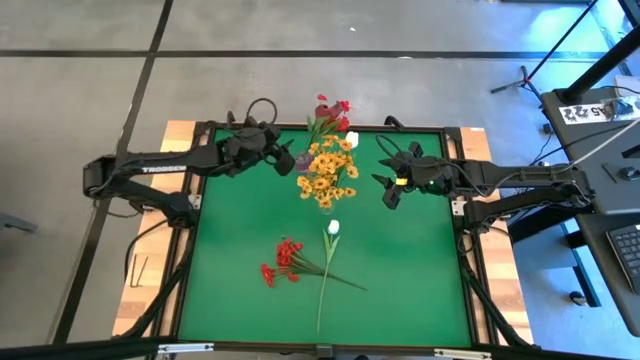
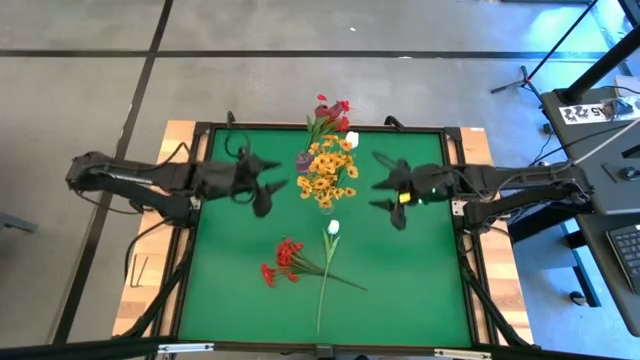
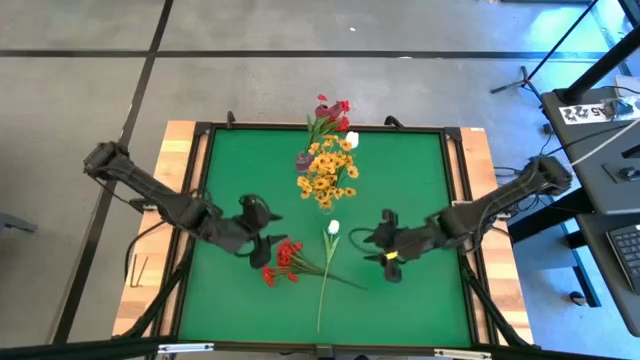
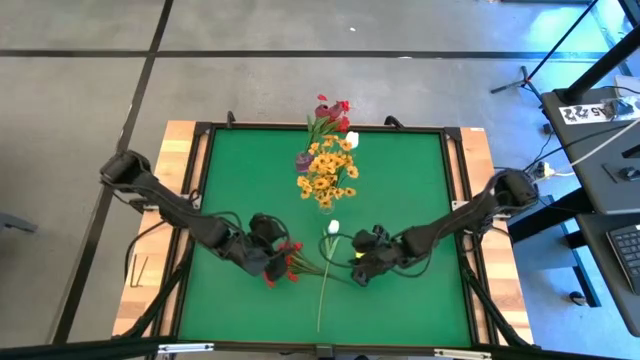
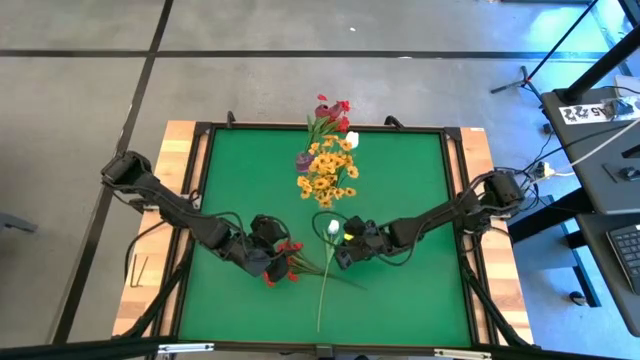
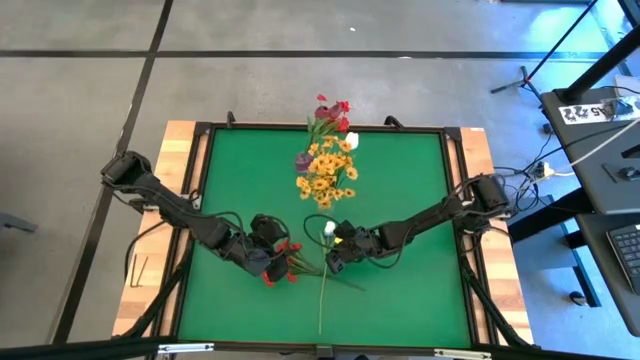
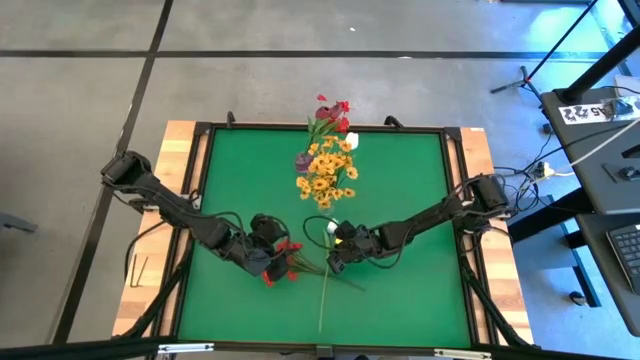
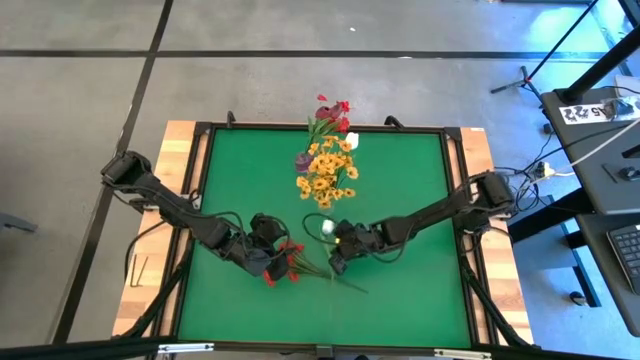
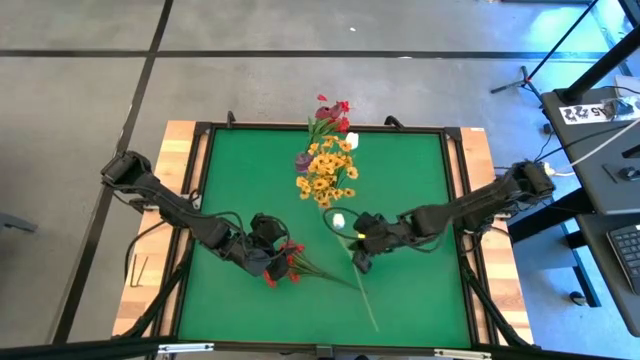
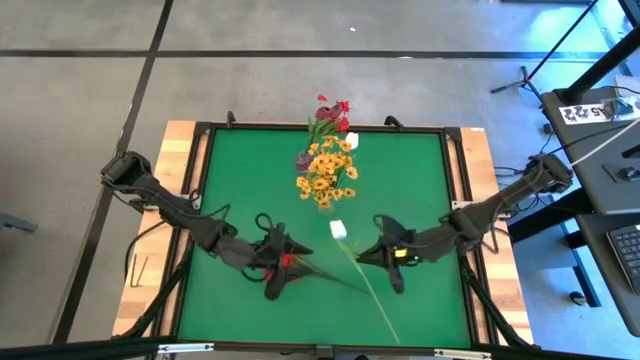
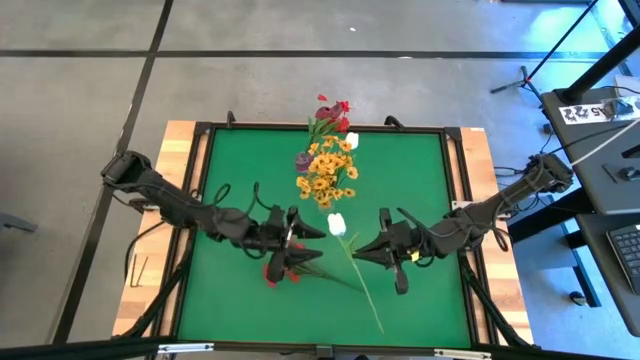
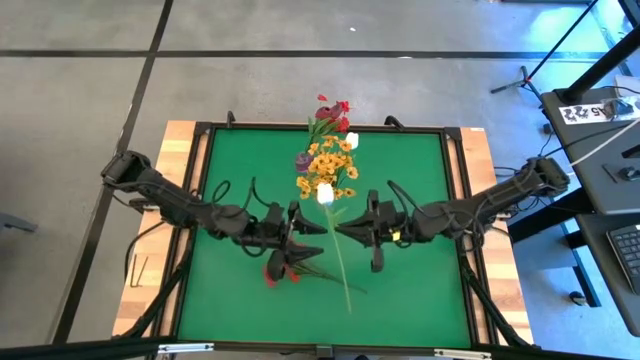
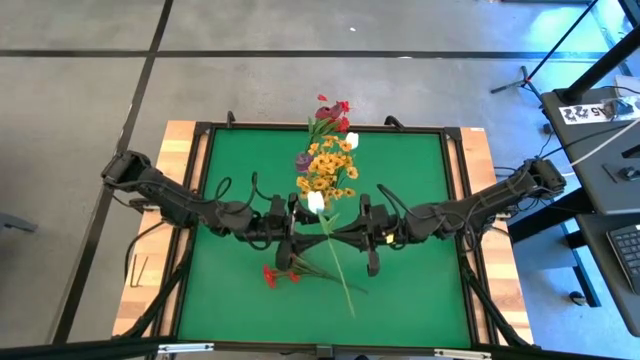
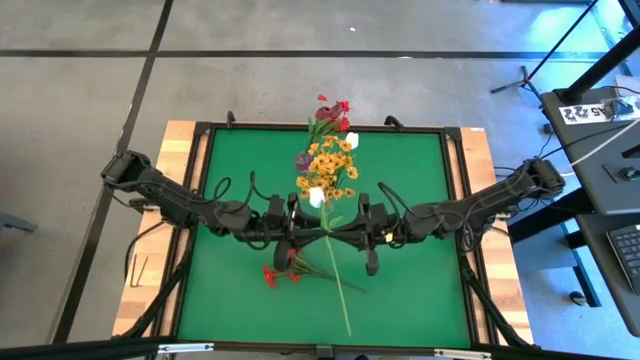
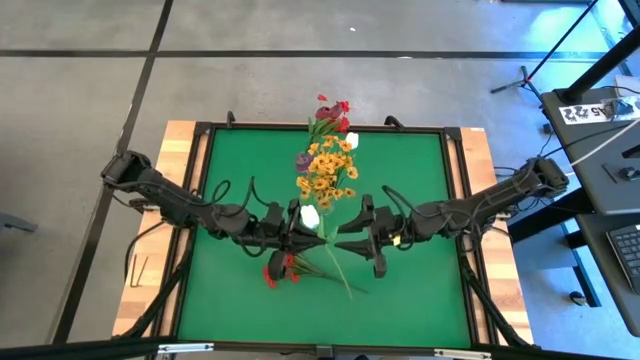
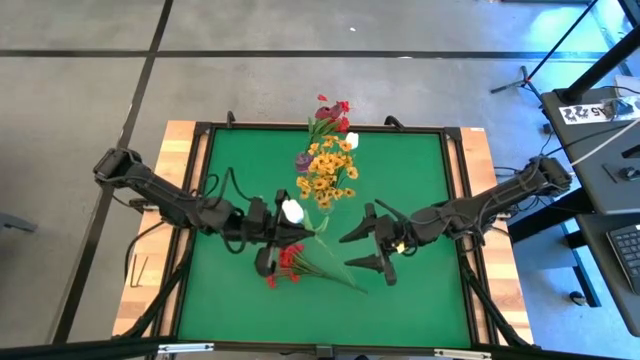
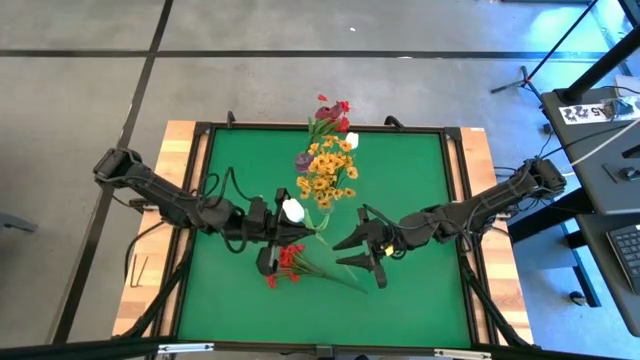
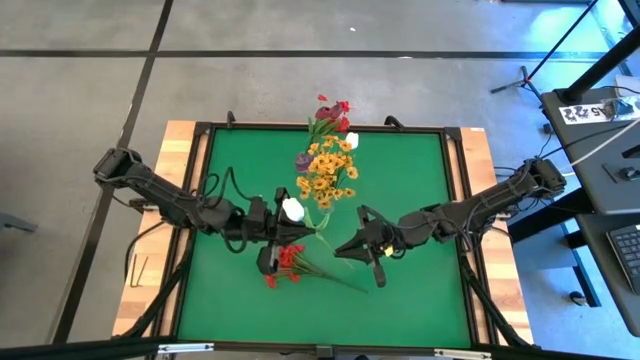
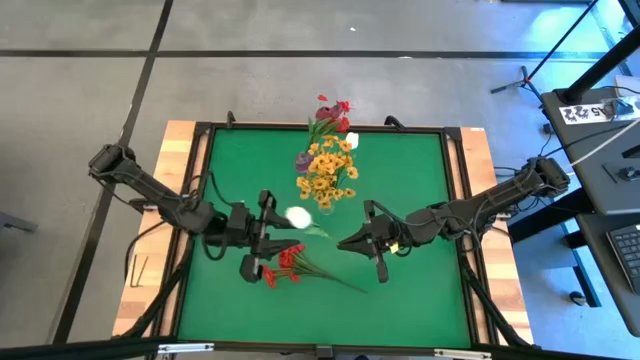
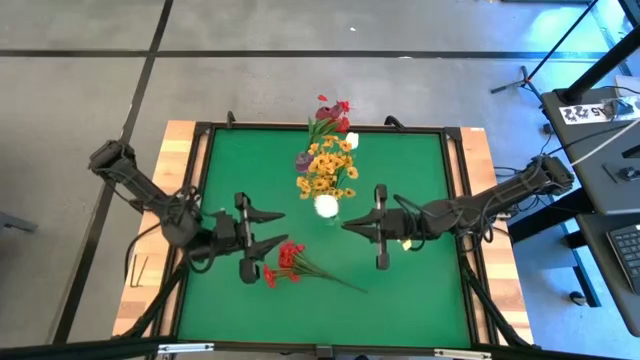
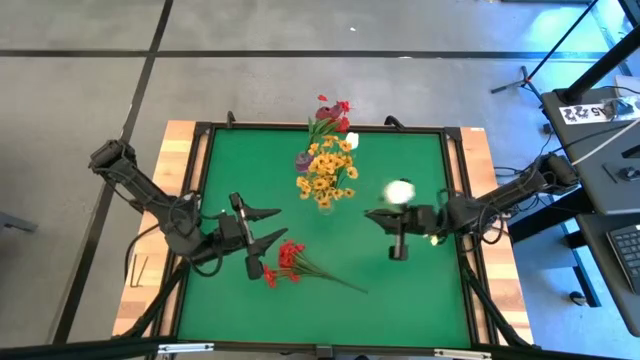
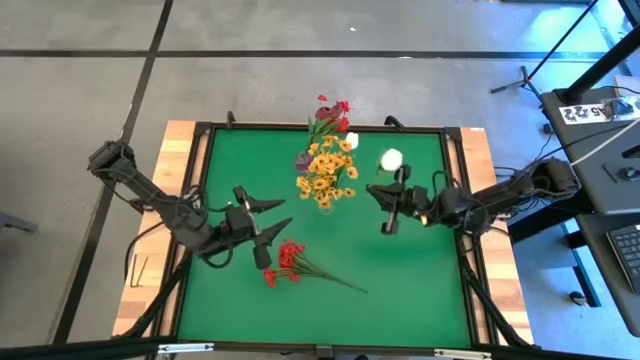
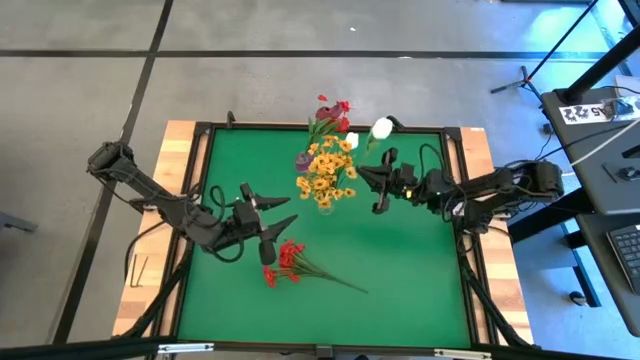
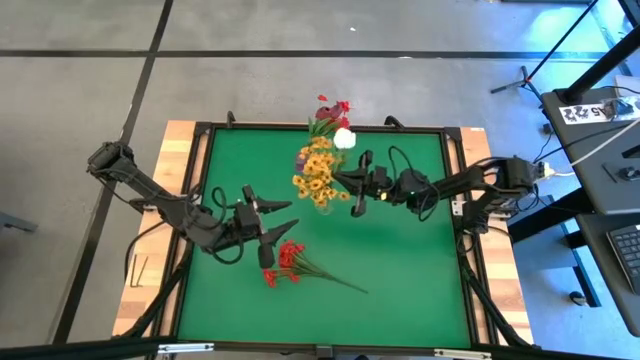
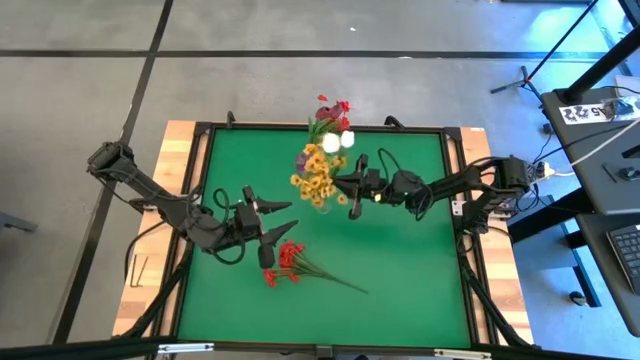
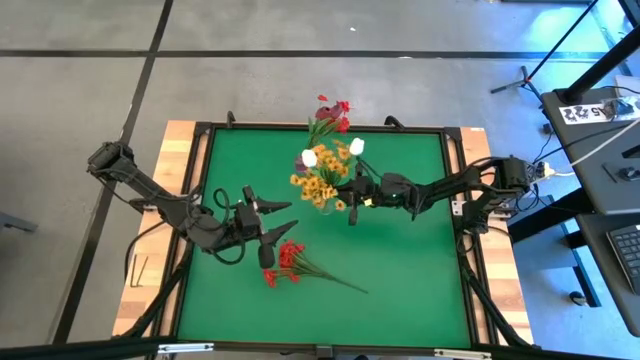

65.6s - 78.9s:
Task: Sort flowers into vase by color
Put the white flower into the transparent vase

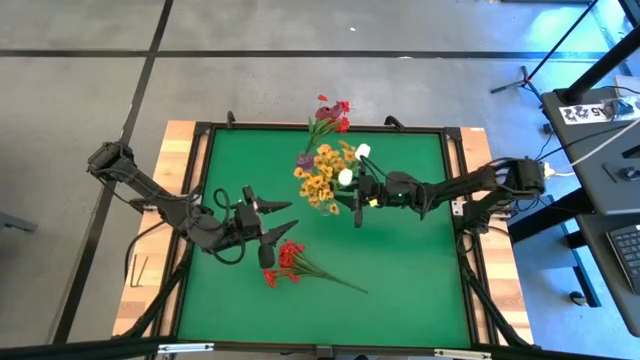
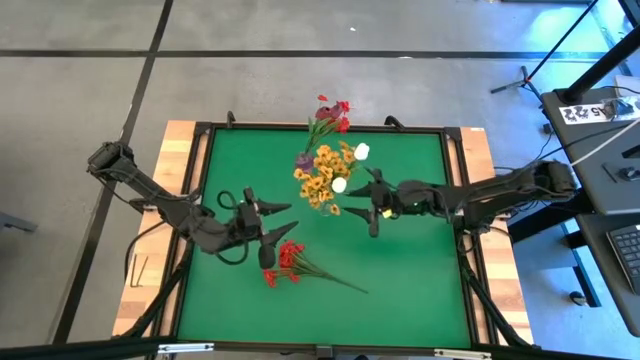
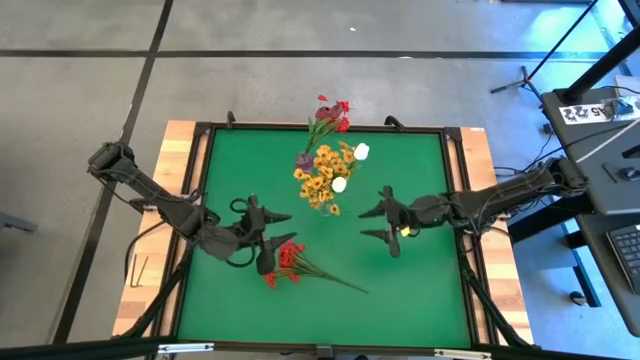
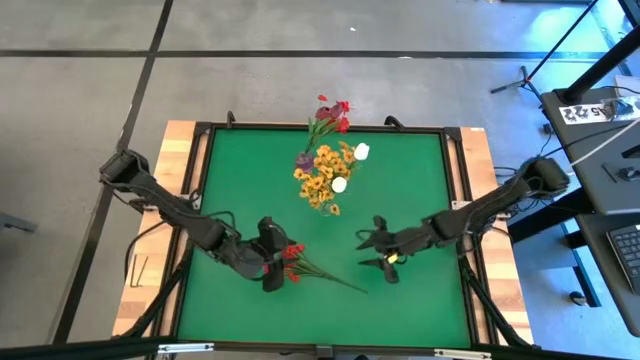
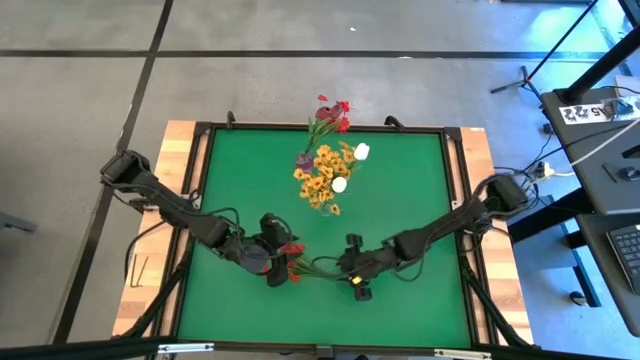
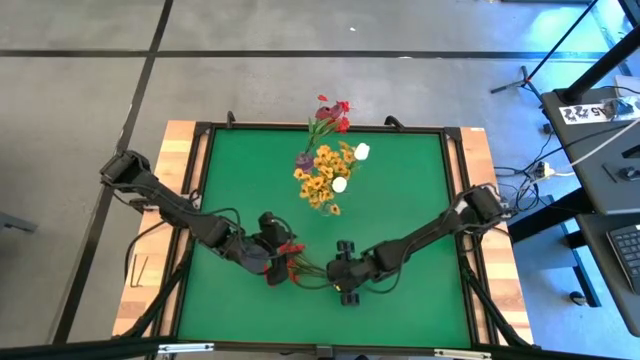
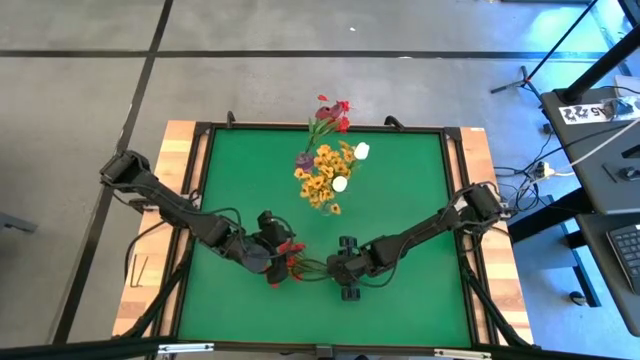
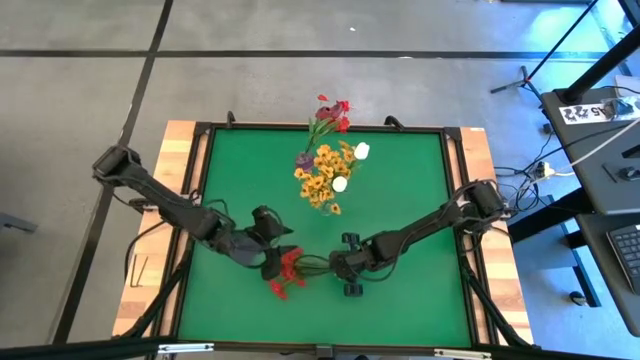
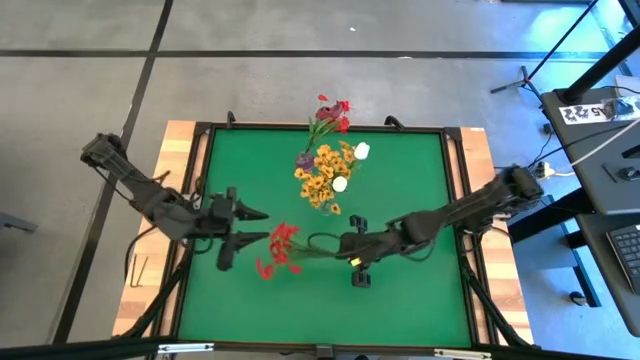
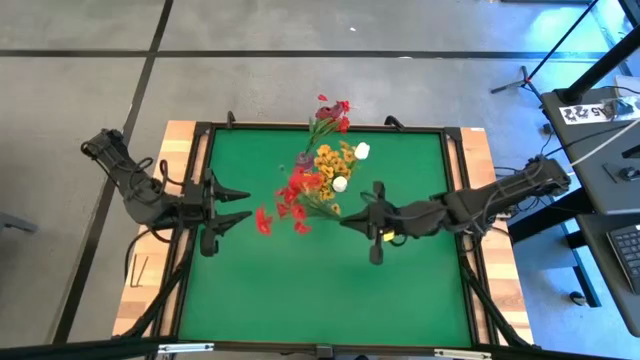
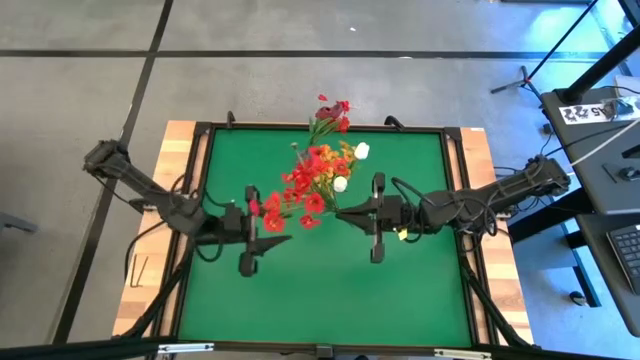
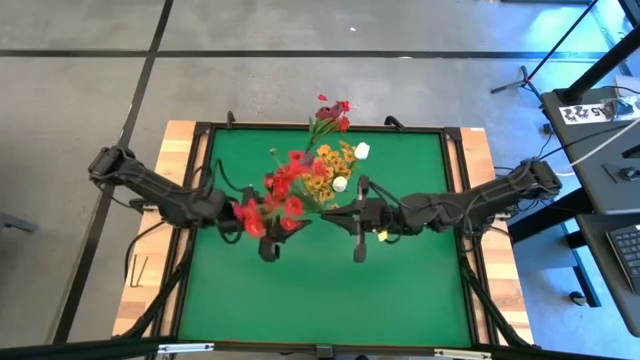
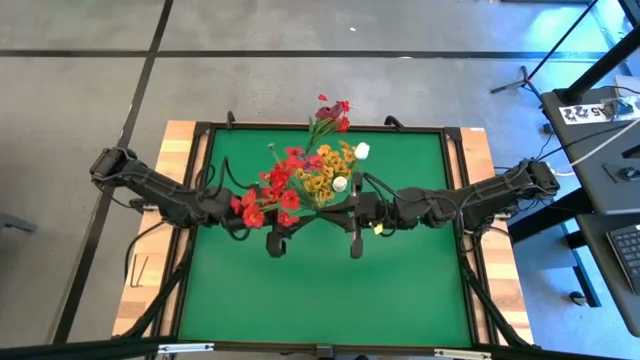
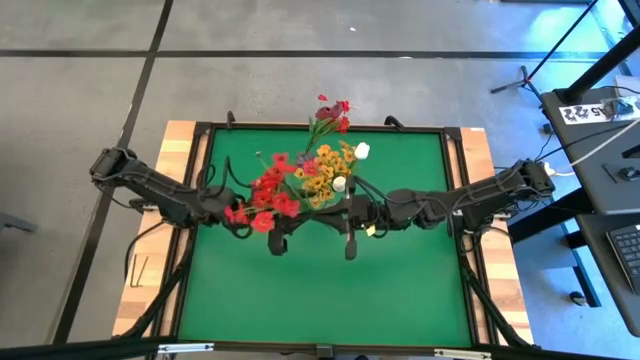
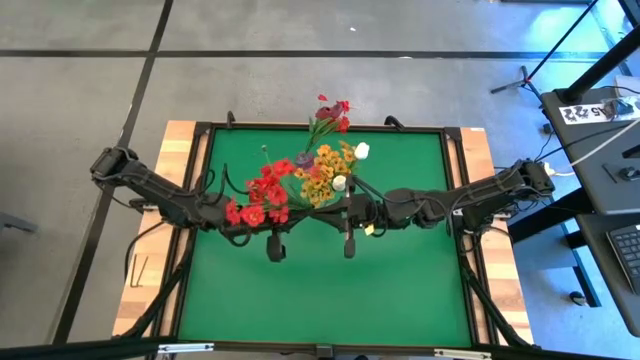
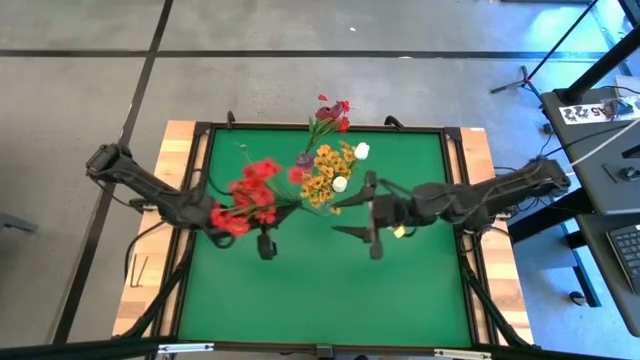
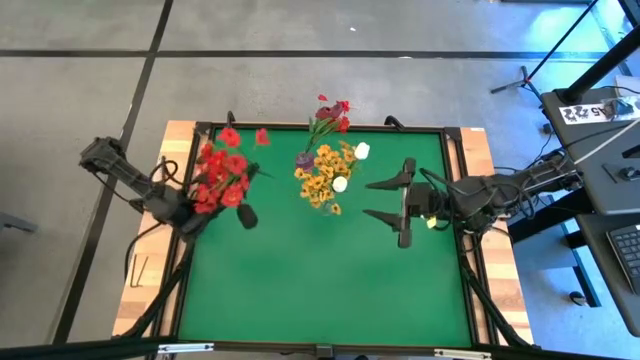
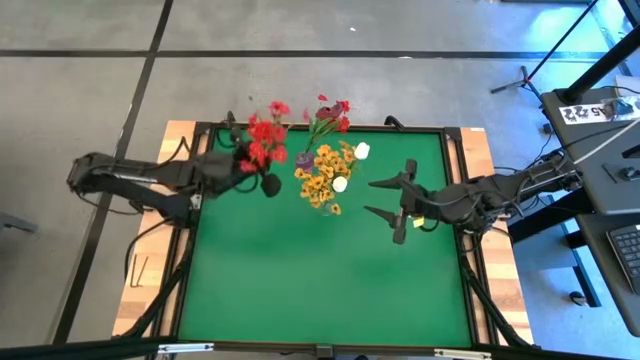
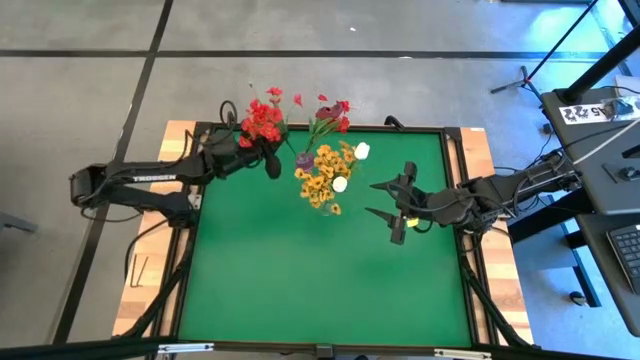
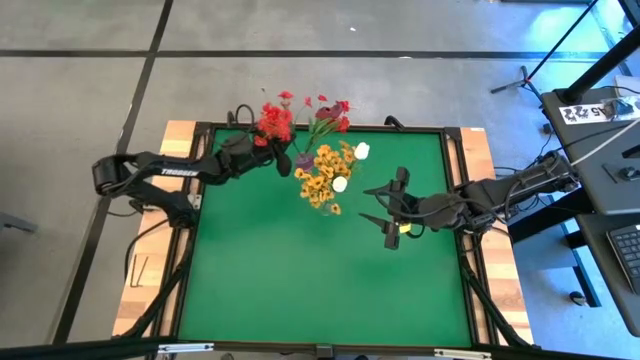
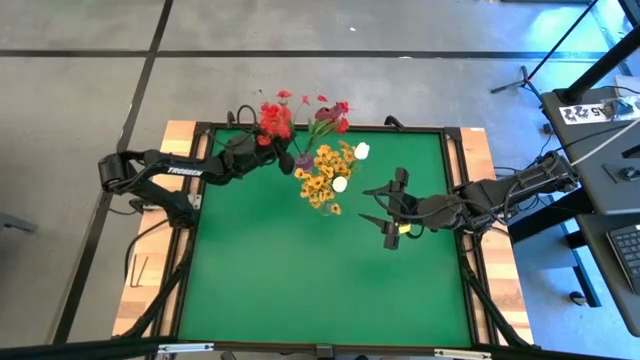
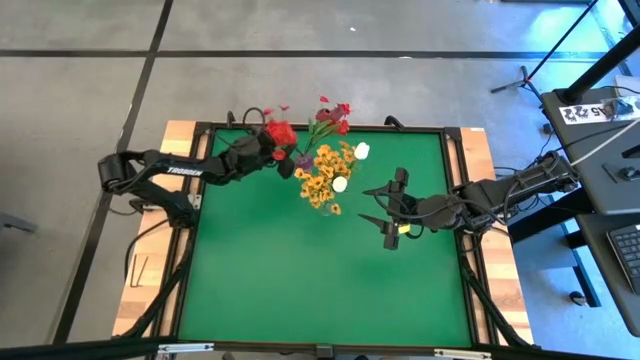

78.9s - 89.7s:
Put the red flowers into the purple vase
